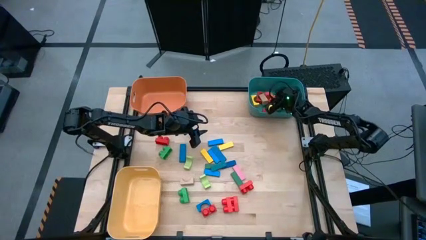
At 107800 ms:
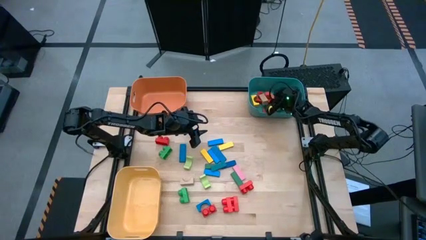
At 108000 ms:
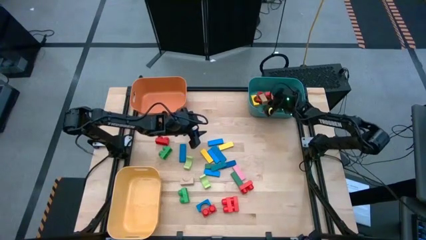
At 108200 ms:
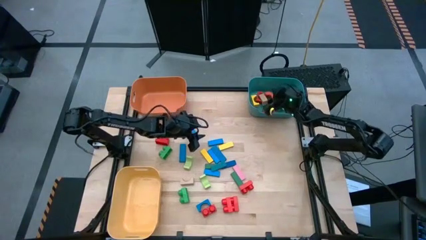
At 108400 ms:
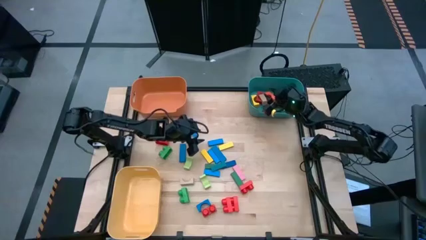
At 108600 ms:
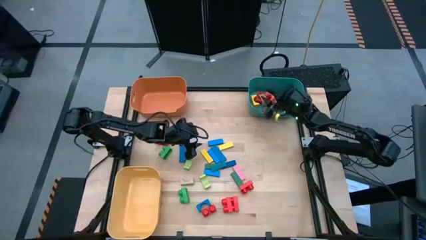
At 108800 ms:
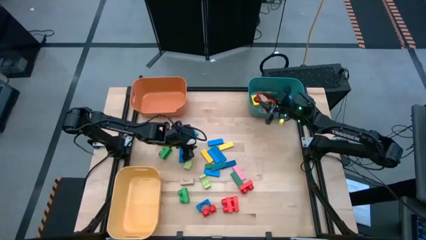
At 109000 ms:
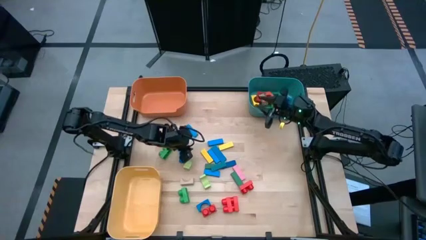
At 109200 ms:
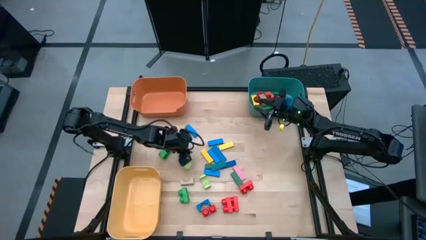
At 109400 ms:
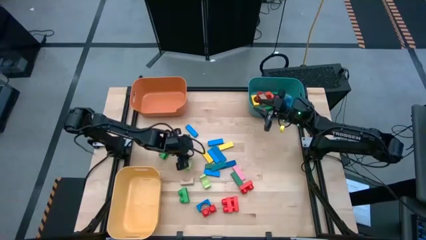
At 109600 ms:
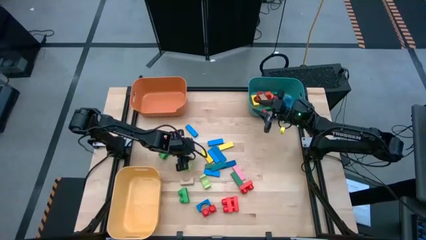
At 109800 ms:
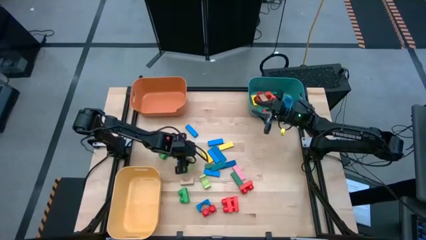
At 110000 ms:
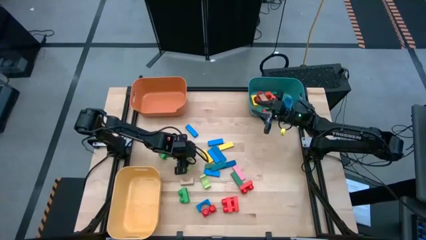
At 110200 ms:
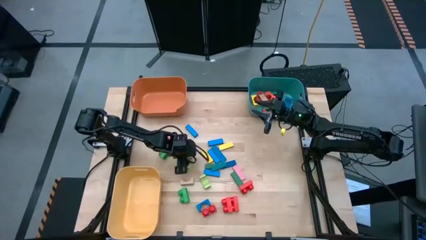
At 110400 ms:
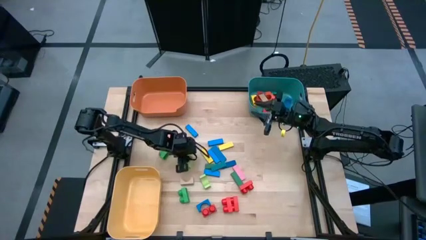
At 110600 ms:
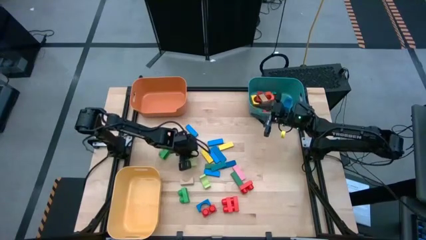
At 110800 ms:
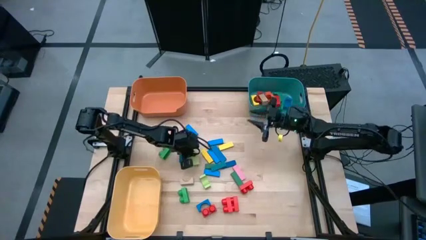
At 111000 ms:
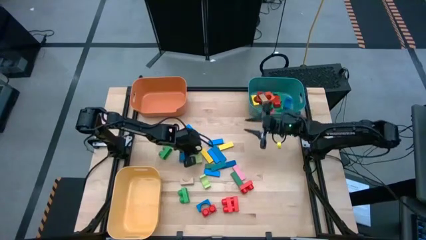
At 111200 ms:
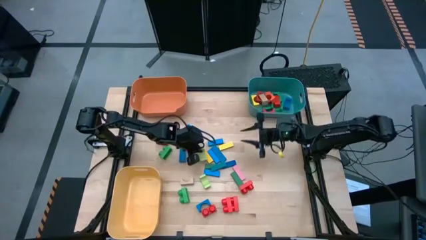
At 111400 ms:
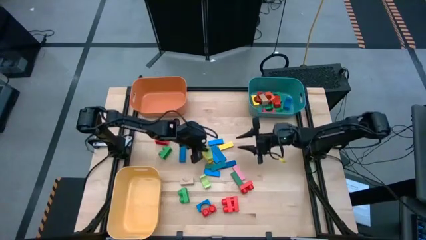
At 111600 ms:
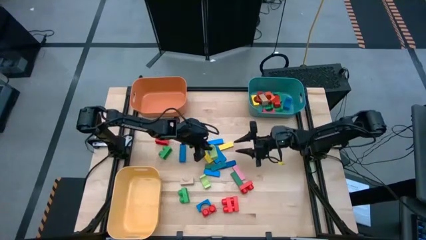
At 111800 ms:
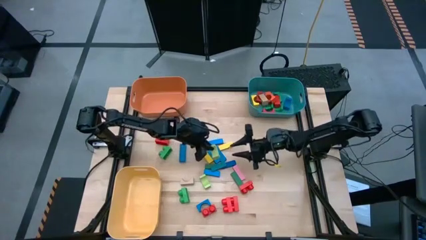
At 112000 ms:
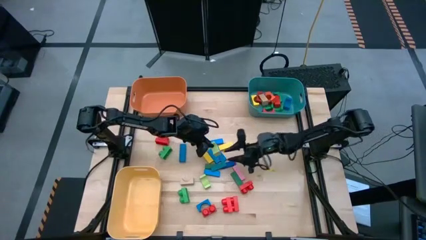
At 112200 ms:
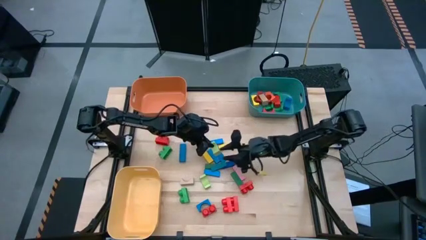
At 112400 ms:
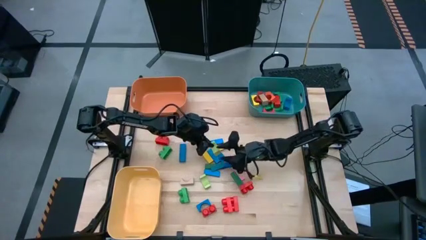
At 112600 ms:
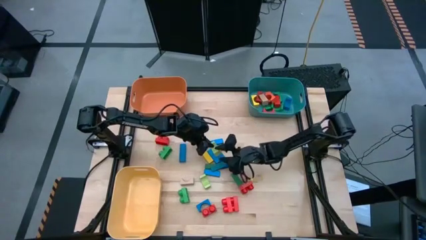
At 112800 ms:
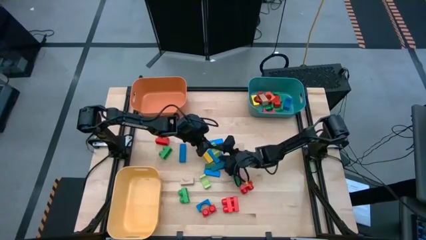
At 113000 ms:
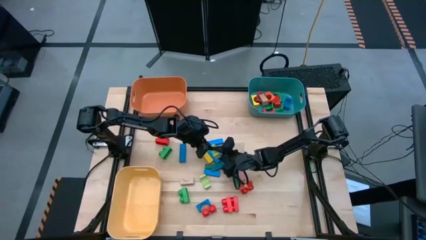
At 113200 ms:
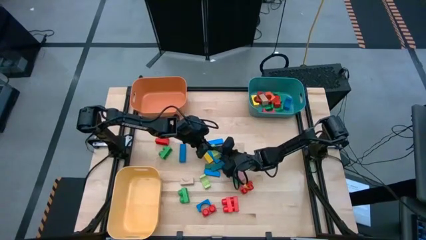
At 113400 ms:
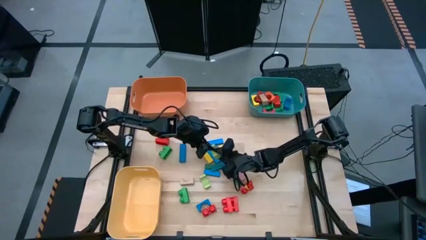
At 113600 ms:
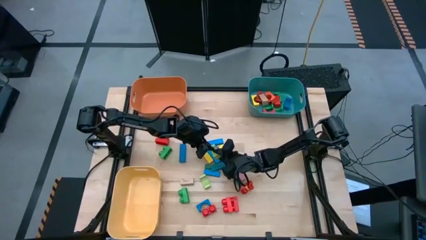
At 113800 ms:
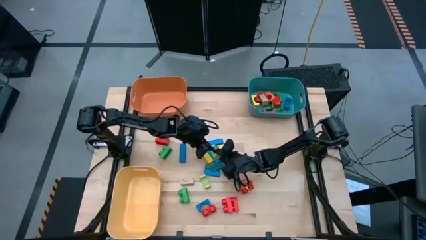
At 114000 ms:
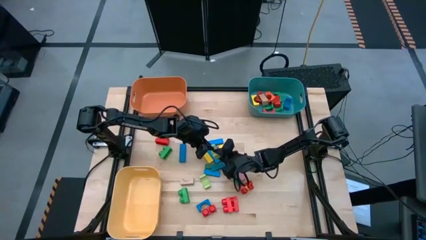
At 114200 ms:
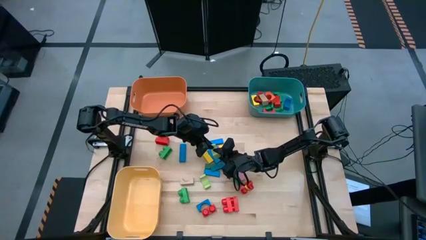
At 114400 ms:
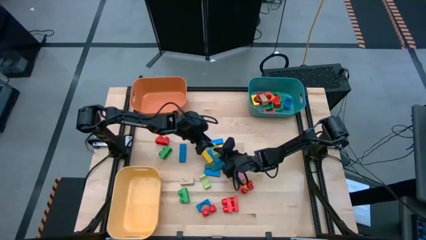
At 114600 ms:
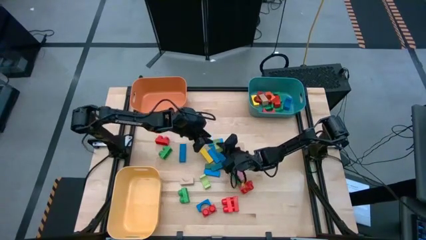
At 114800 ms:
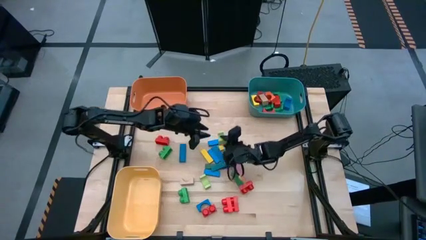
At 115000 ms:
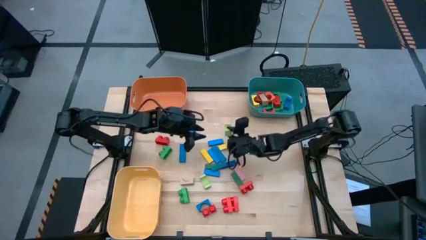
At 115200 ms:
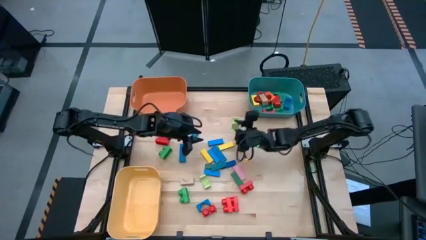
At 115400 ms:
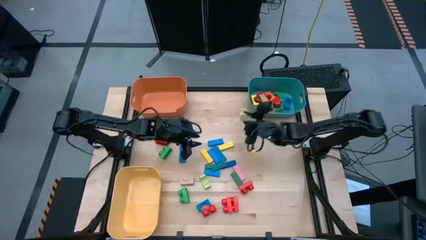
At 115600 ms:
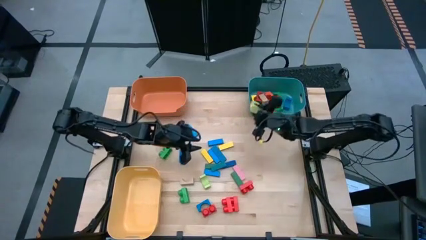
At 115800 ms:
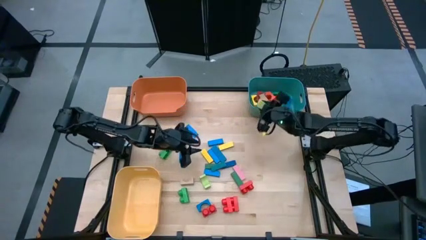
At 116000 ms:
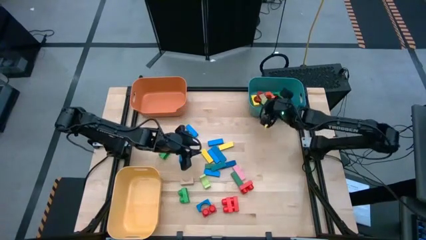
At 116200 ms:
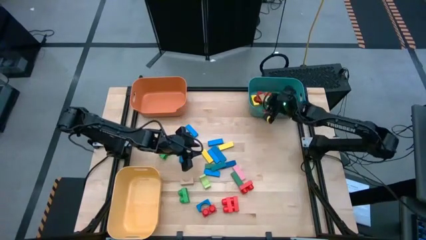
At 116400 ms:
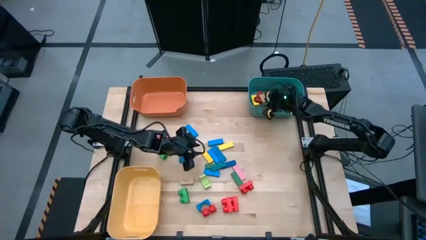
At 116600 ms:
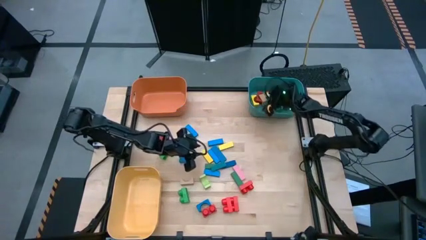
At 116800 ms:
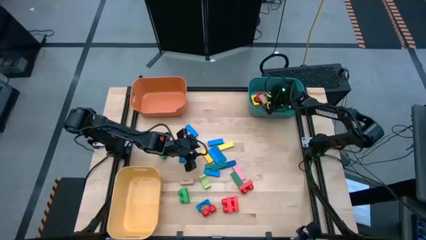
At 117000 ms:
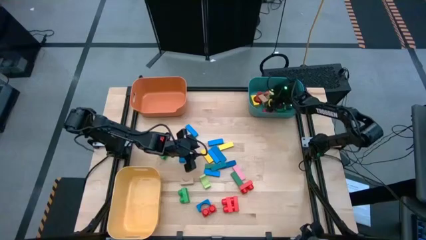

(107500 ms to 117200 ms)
Task: Sort blocks by size
Put the light green arch block into the blue bin

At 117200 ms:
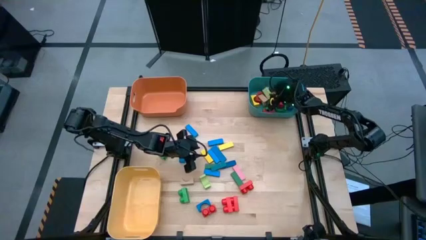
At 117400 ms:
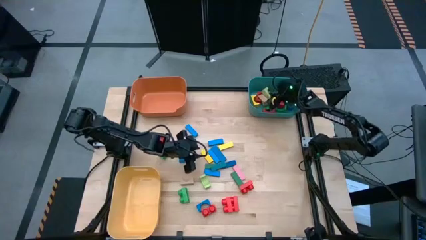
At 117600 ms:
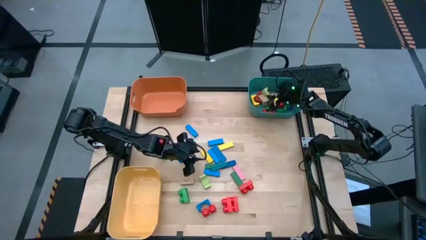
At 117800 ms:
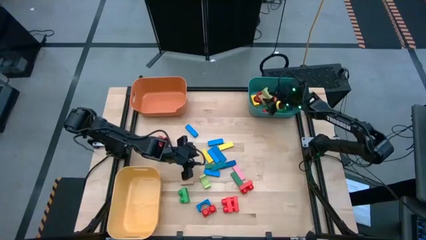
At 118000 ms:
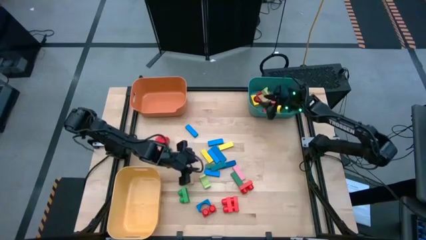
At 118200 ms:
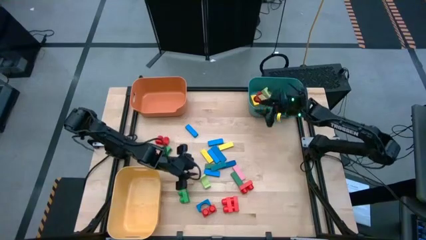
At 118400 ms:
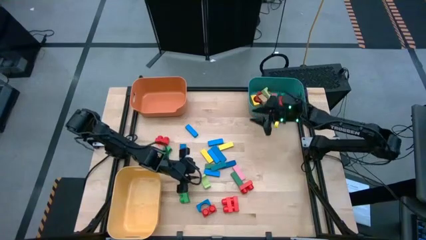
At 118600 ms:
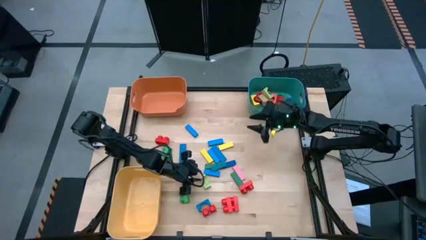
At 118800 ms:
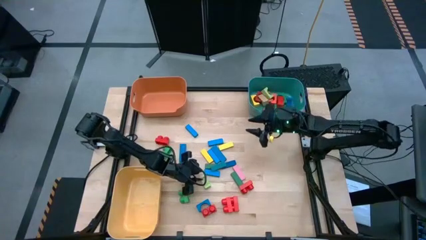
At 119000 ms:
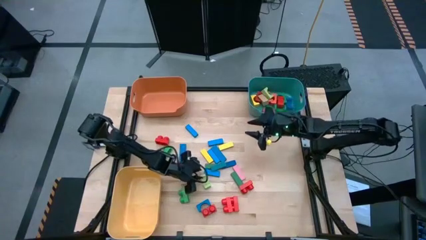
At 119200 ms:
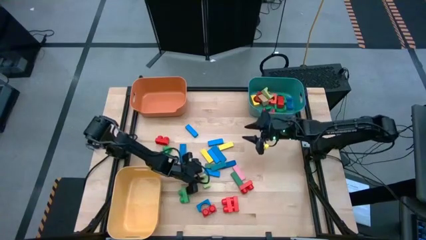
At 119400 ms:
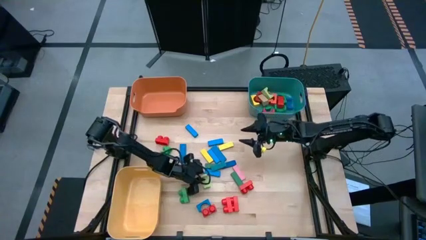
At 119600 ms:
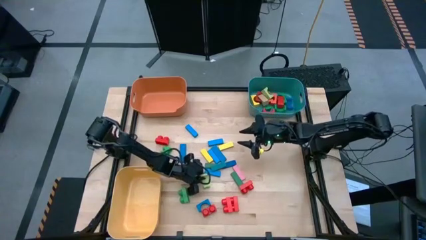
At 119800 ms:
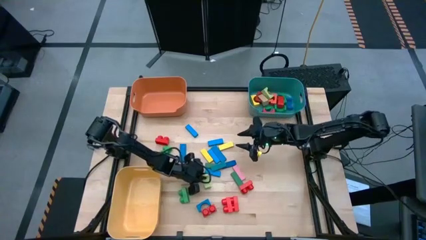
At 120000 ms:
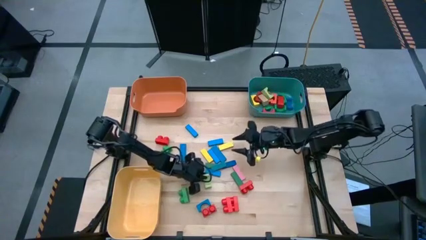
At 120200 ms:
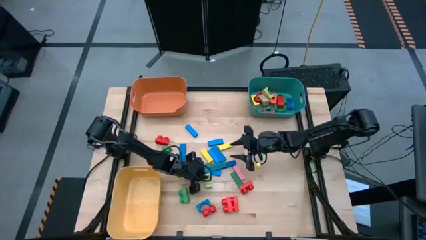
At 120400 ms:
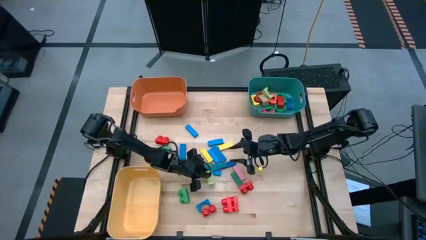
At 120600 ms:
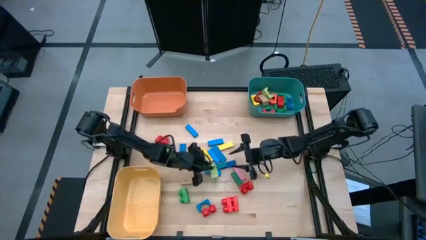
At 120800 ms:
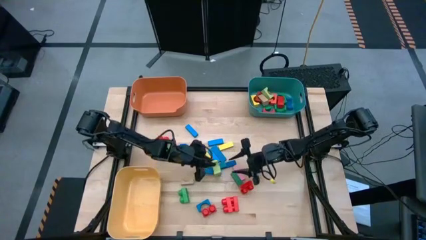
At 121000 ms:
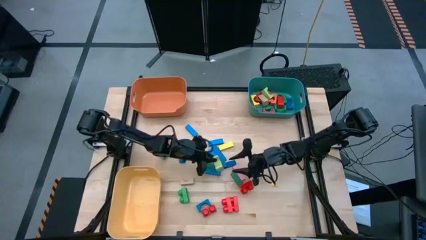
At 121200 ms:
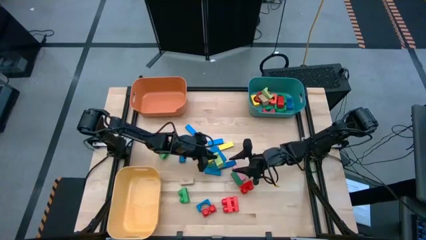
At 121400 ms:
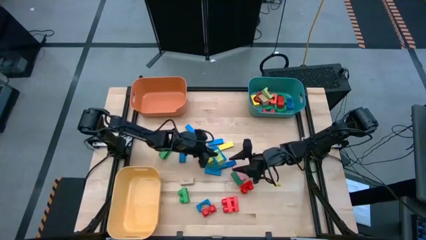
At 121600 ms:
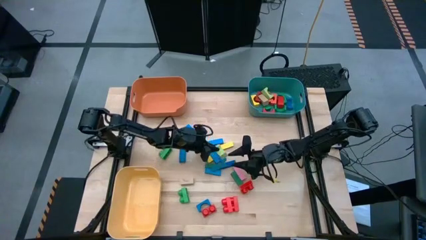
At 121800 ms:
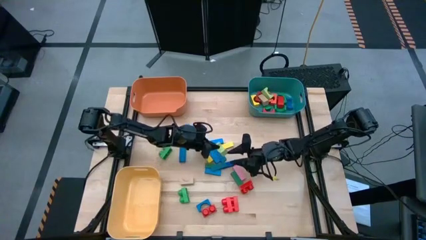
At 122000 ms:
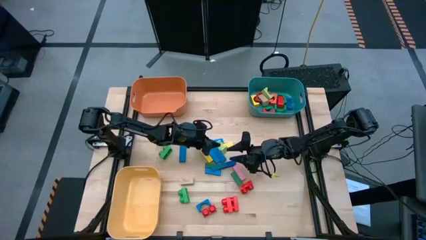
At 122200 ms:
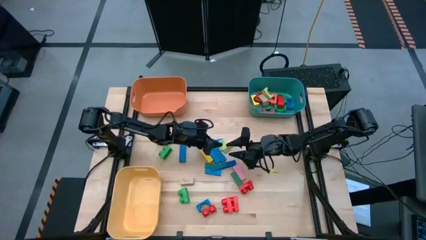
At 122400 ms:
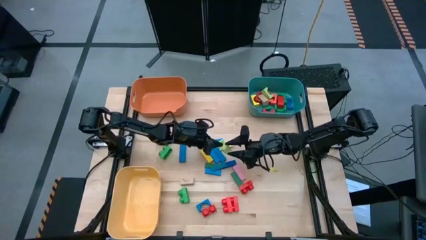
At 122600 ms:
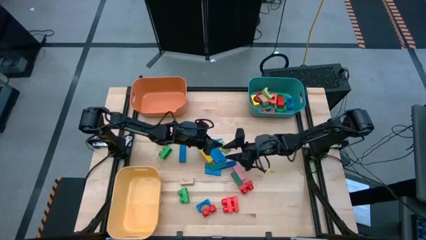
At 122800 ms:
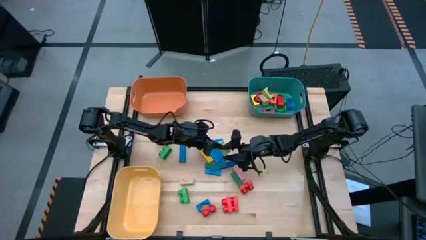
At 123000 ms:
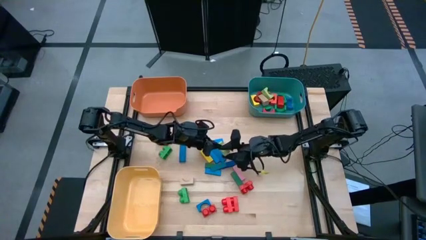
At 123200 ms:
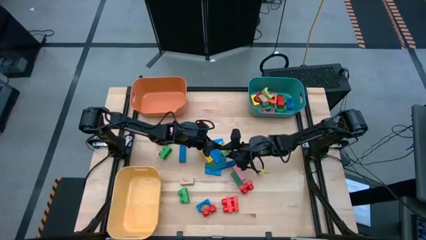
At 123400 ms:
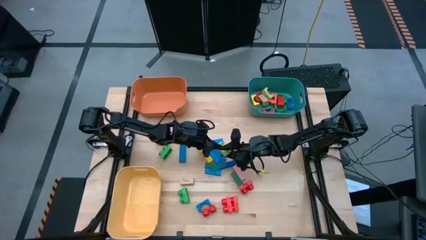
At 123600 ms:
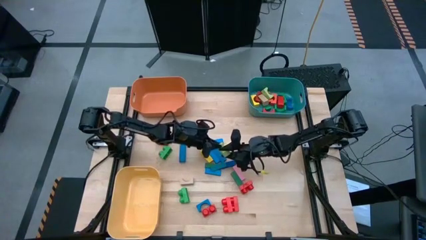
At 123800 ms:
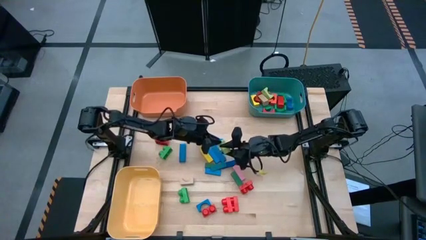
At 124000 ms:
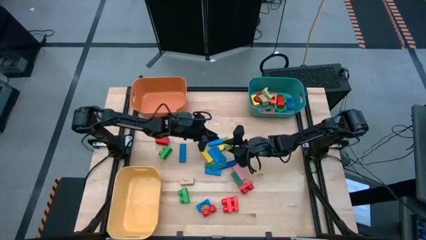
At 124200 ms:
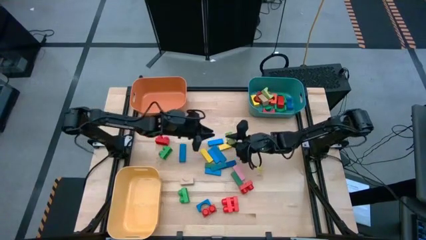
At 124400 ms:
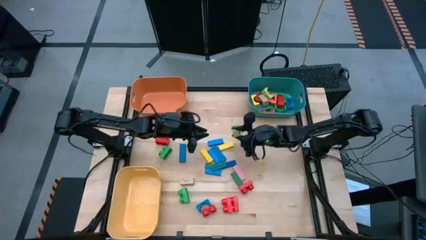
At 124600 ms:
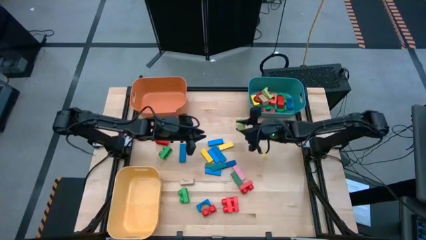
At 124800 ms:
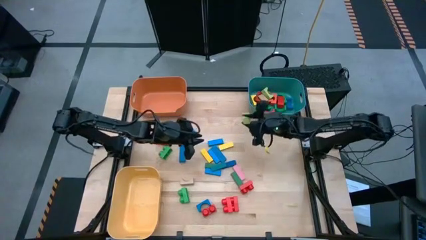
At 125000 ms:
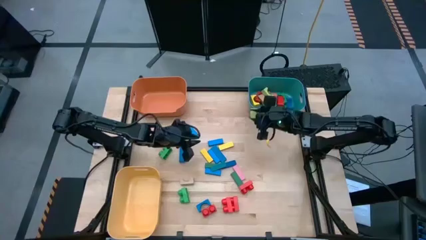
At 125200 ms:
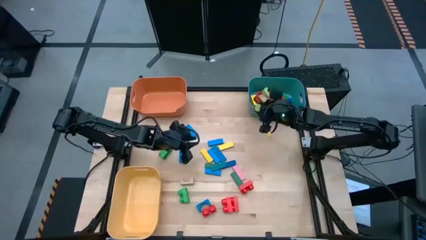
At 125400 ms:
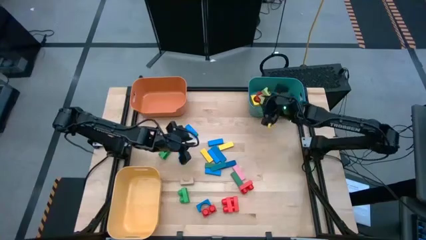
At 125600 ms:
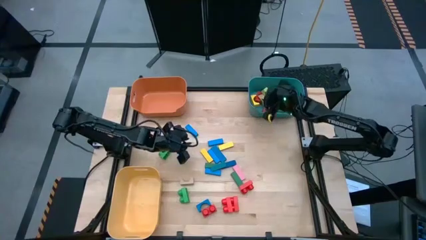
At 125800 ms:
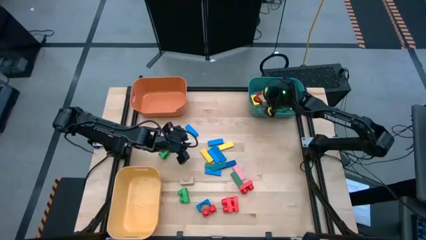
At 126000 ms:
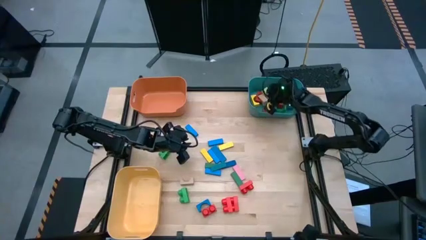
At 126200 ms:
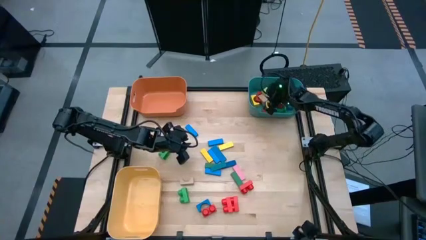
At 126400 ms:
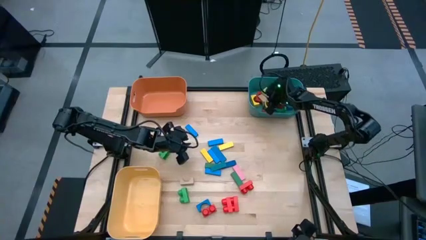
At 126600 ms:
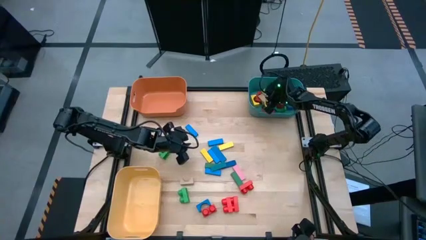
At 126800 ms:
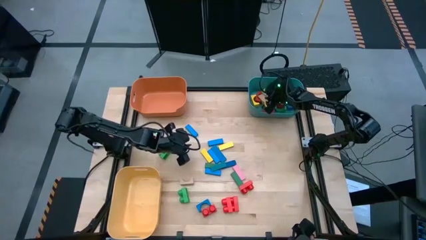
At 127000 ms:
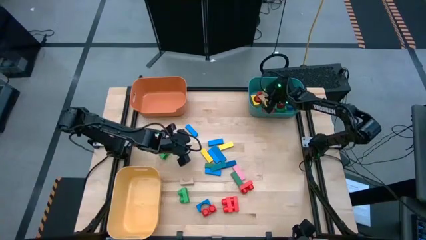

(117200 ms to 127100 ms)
Put the light green arch block into the blue bin
